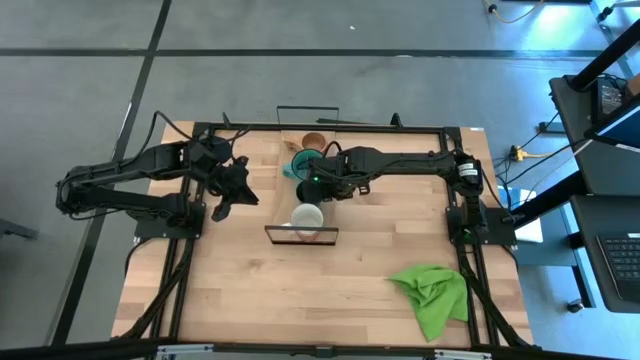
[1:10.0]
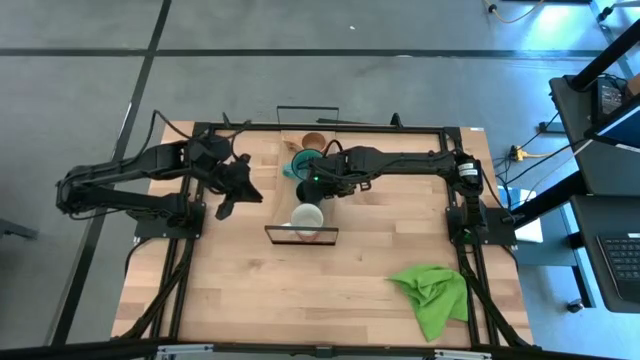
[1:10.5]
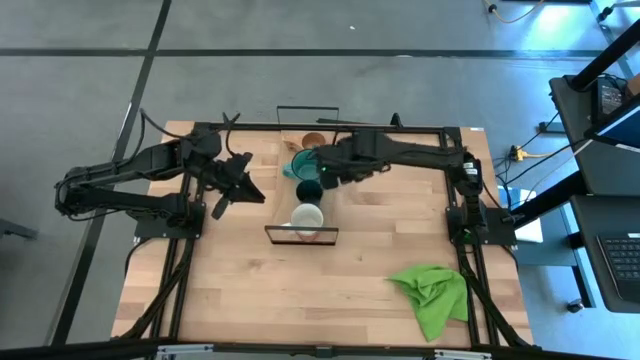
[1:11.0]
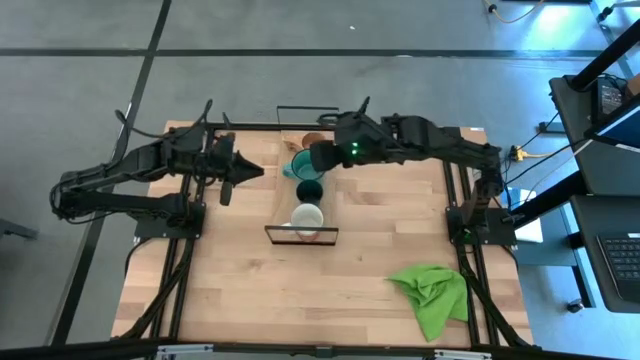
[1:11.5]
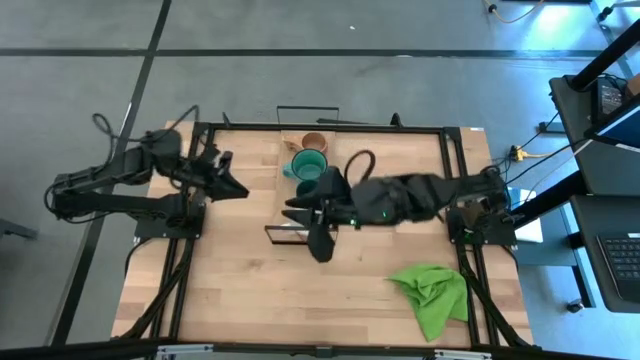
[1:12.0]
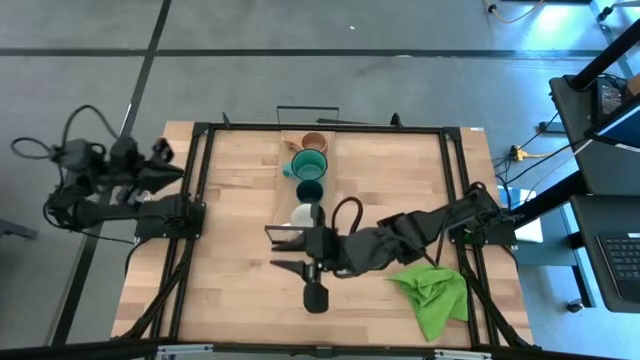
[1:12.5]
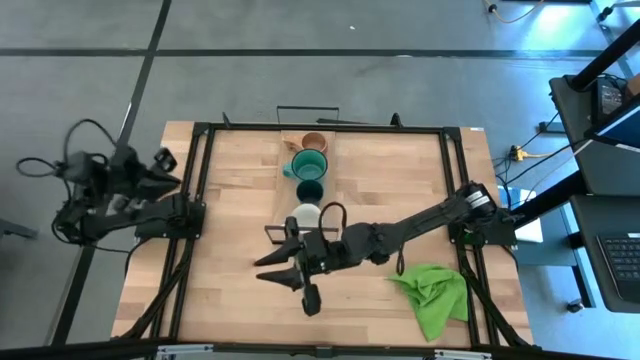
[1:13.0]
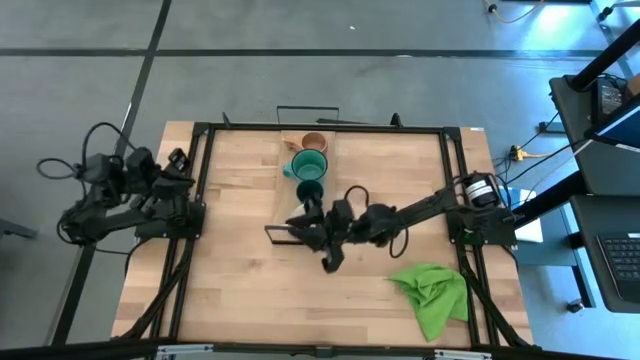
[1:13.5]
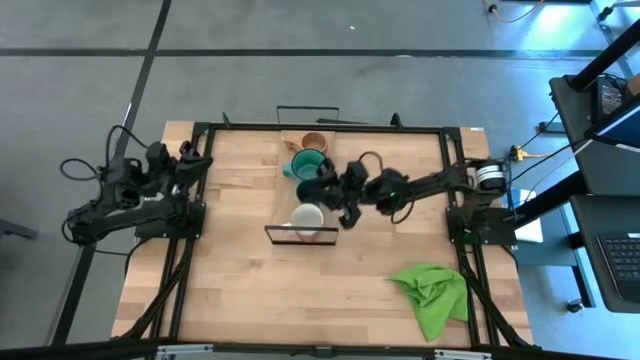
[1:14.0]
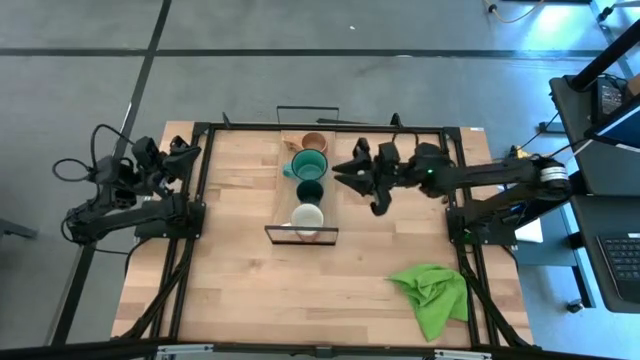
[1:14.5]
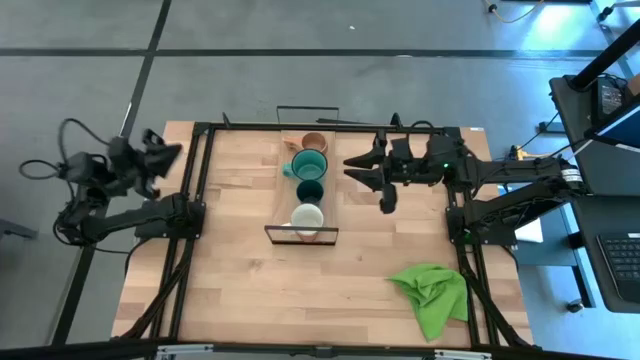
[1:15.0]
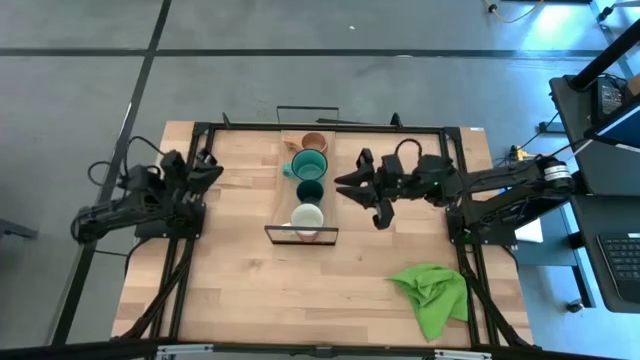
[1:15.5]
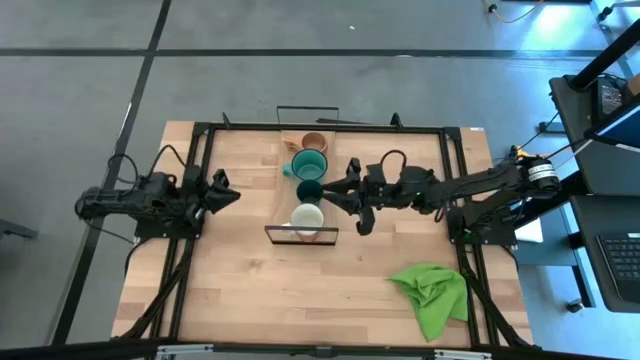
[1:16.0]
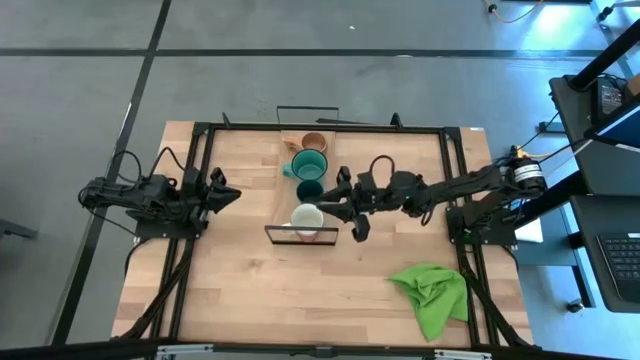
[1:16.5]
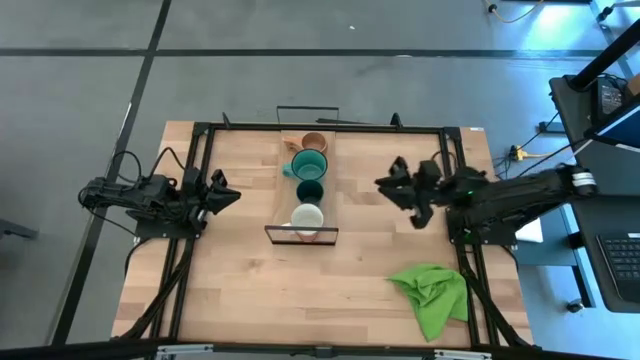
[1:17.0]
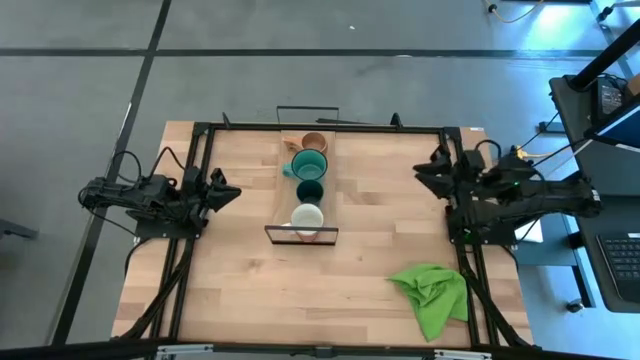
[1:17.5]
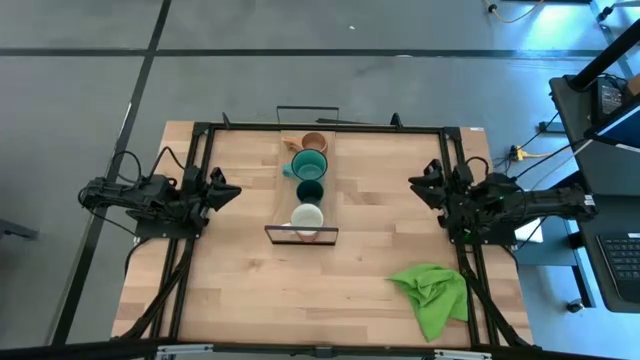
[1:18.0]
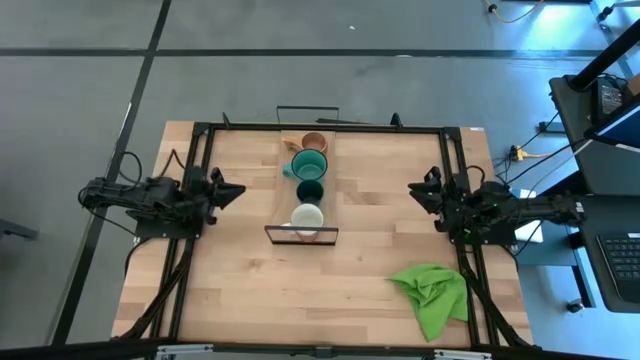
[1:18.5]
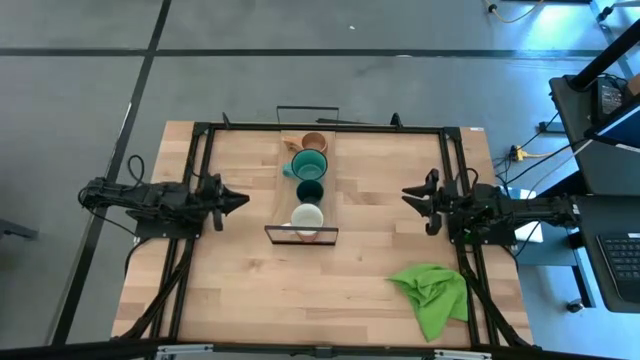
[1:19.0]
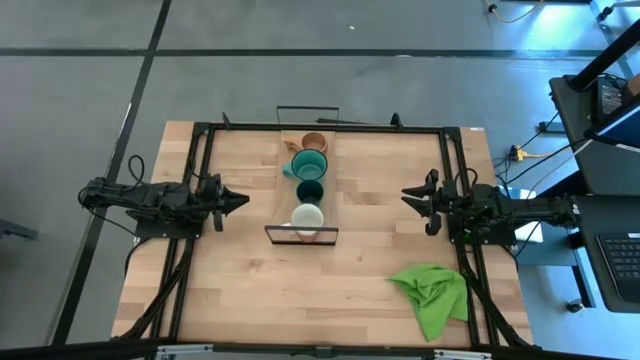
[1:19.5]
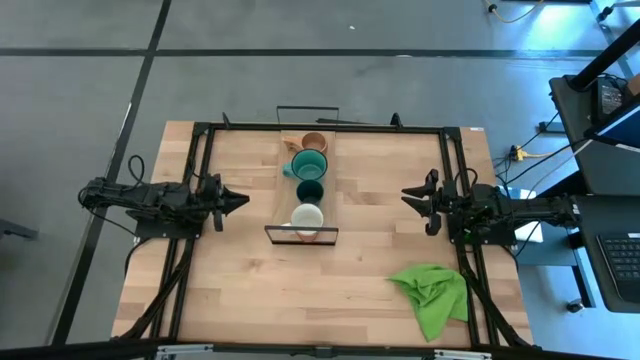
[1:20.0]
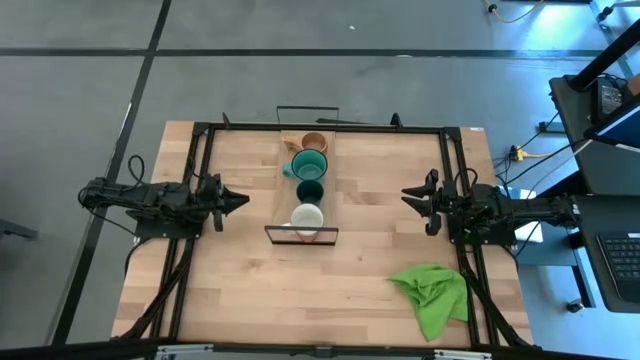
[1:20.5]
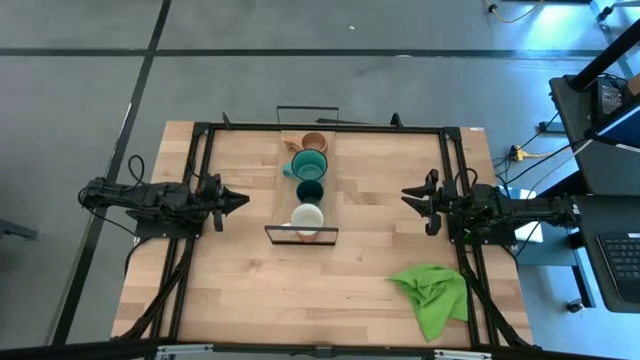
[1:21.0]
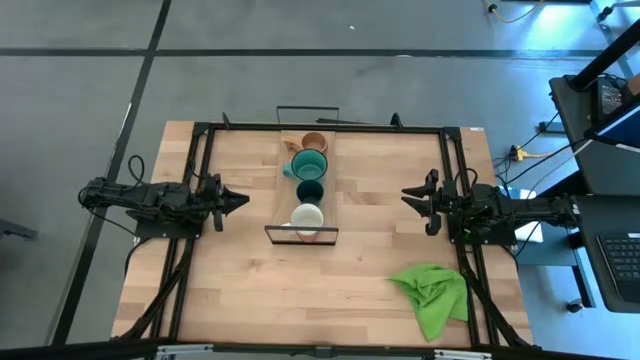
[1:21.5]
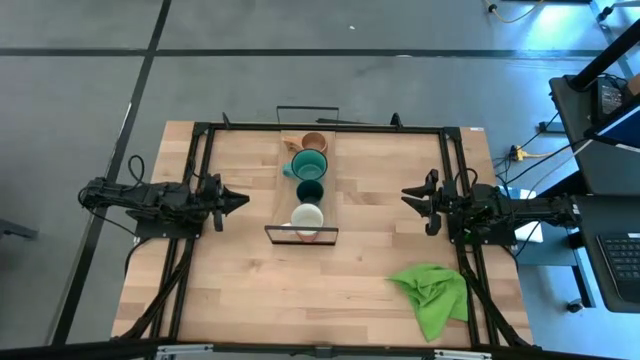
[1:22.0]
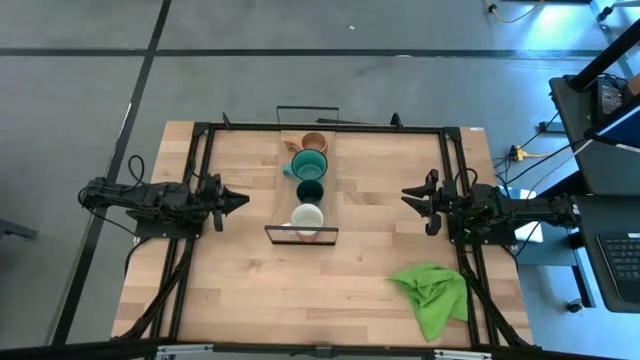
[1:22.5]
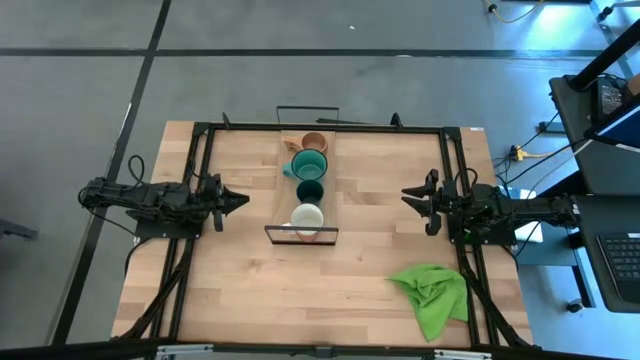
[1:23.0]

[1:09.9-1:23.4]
Task: Stack small to large cups/mugs on shelf
Return to Home Position

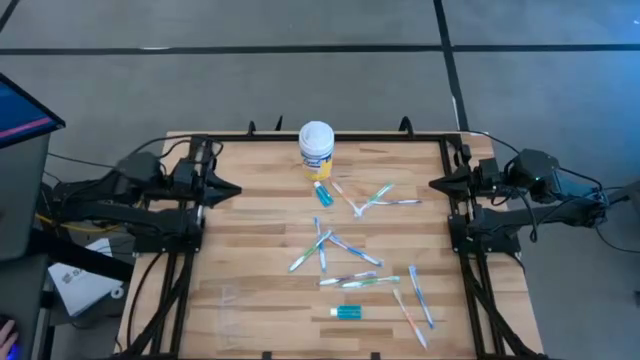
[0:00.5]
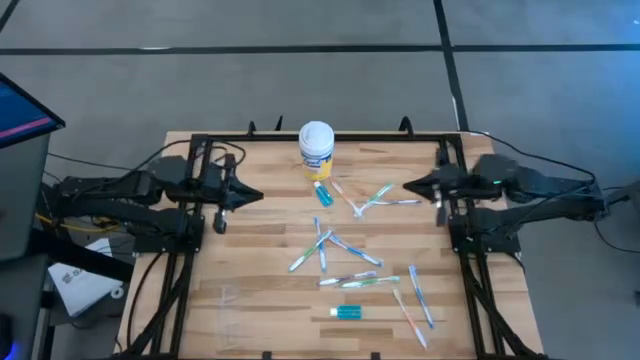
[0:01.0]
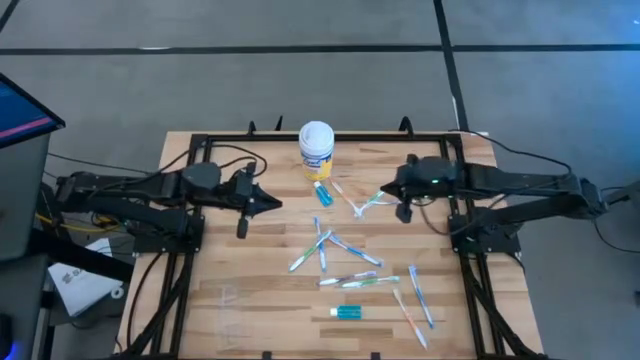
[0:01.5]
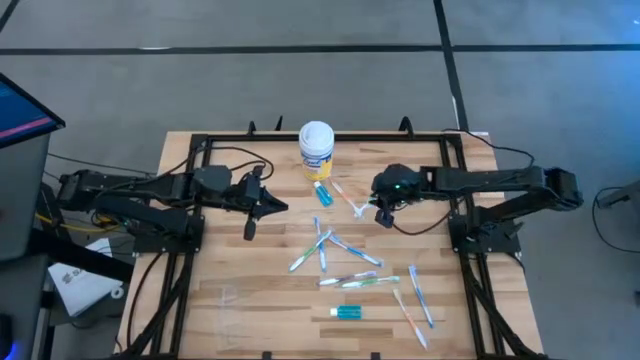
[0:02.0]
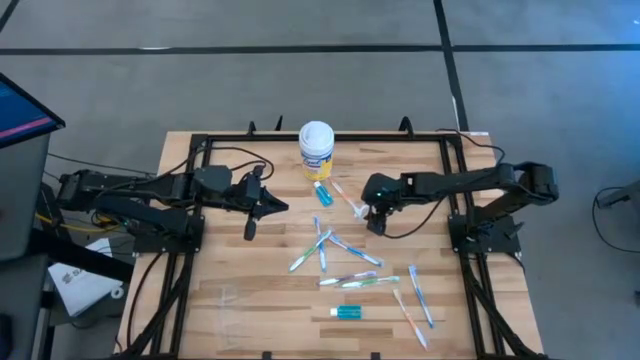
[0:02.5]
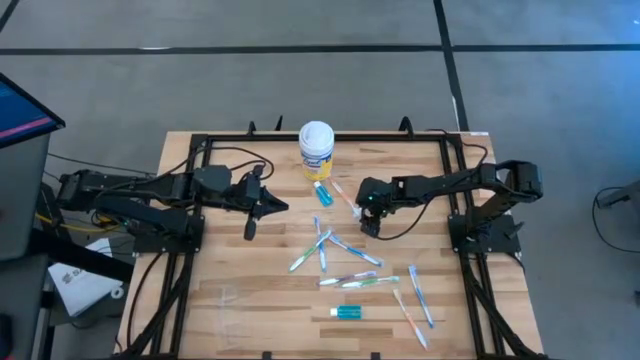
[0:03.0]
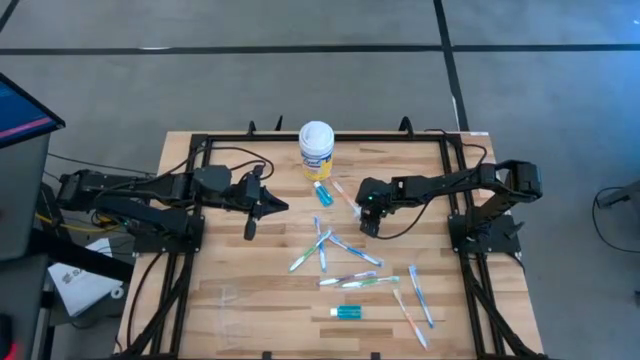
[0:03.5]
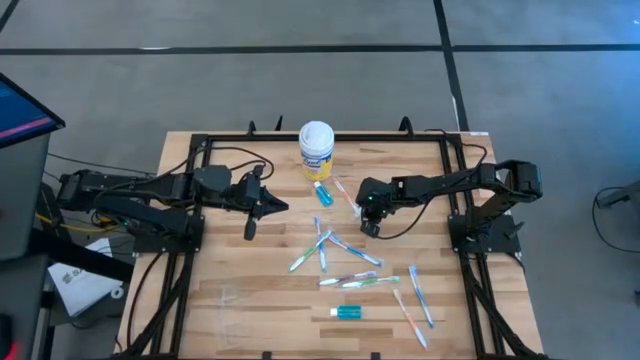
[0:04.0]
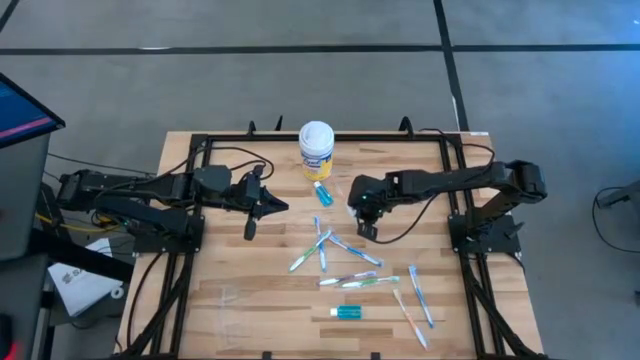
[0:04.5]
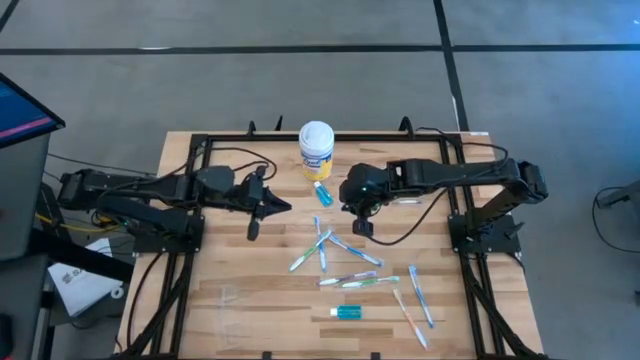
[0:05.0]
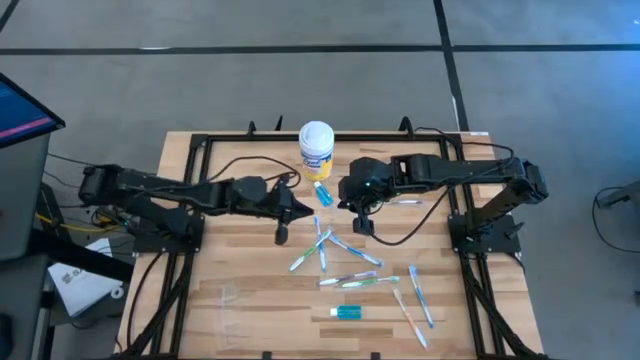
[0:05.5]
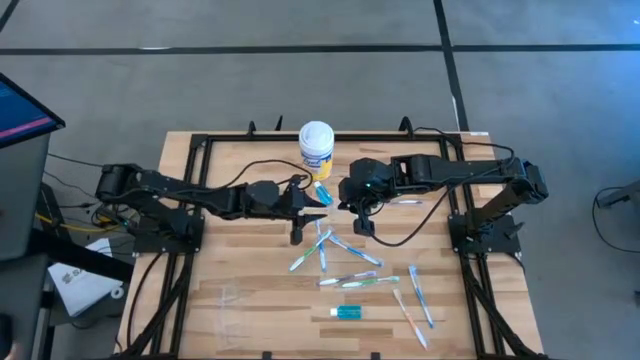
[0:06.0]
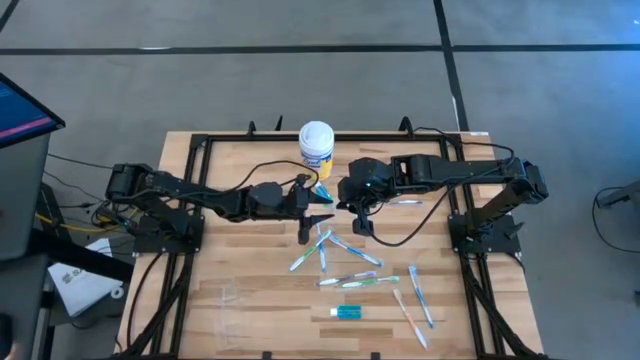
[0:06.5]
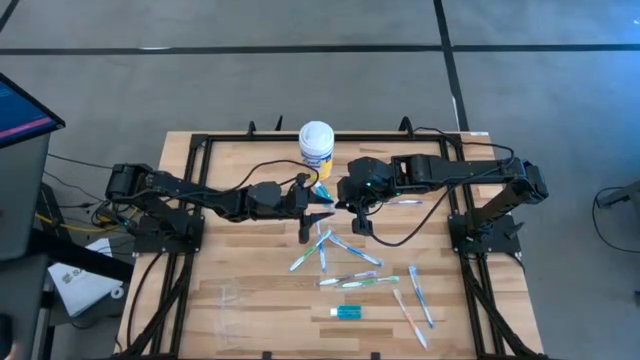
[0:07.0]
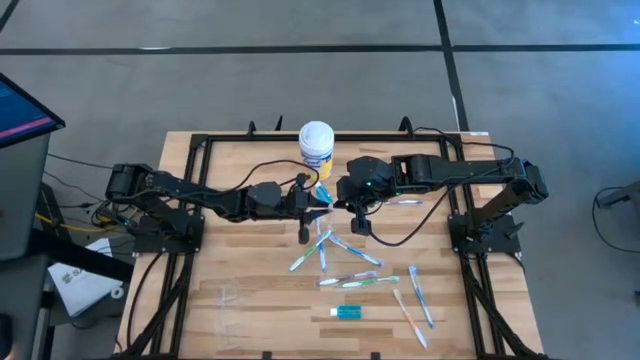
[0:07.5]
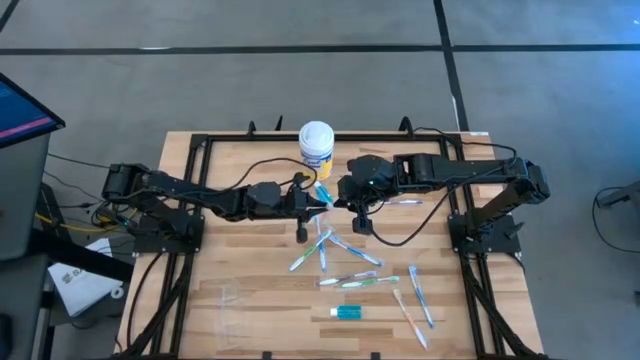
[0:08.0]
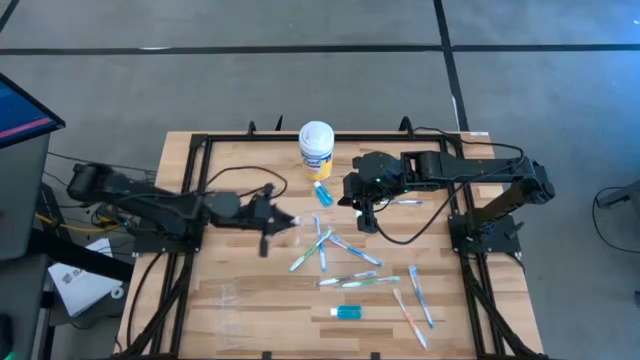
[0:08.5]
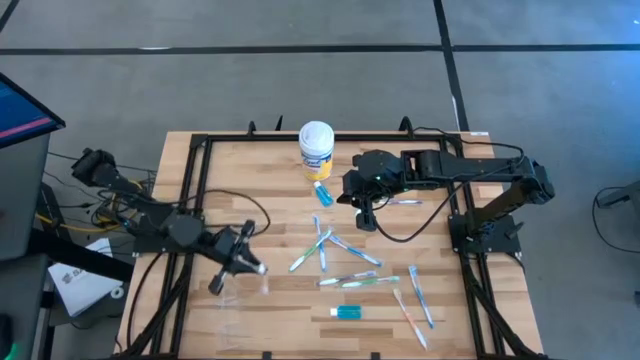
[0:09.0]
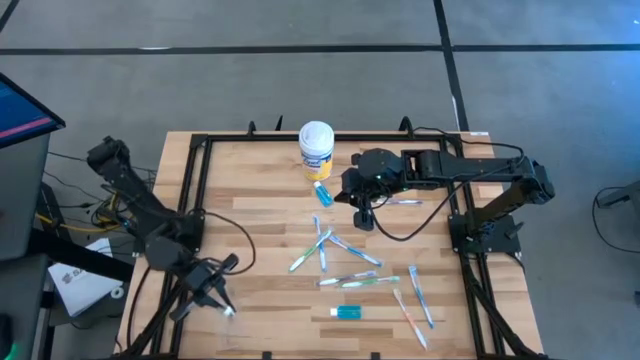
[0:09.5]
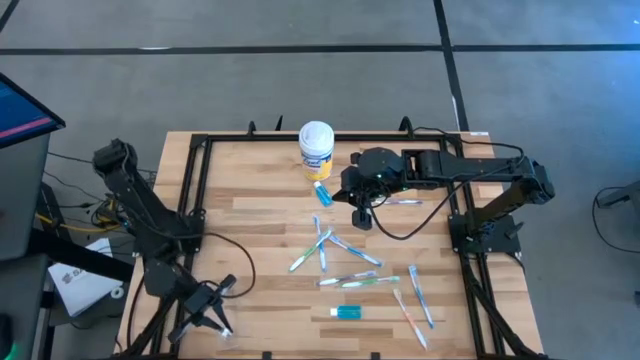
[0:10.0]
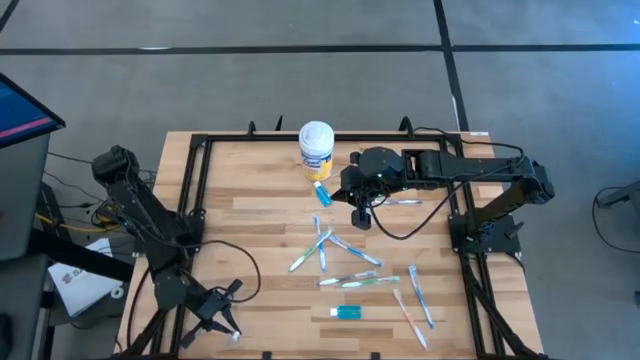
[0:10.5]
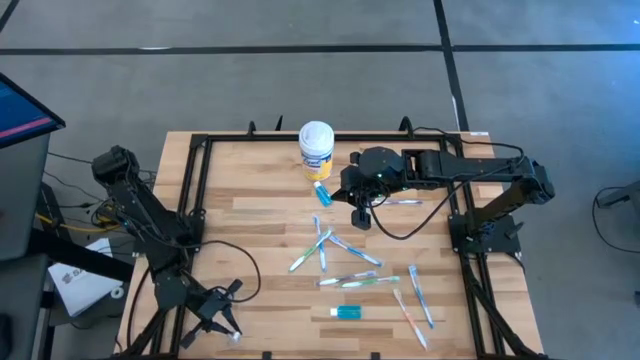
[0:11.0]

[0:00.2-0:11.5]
Task: Pick & Place toothbrushing station
Put the top orange toothbrush into the transparent organizer
